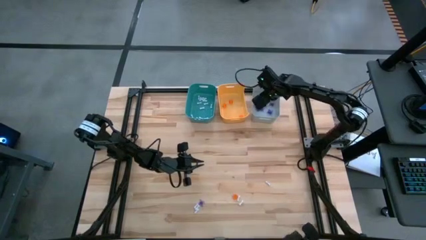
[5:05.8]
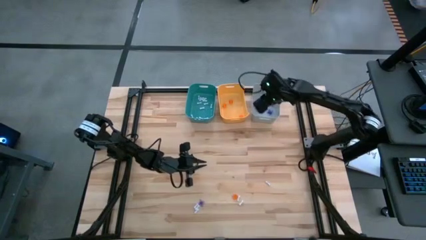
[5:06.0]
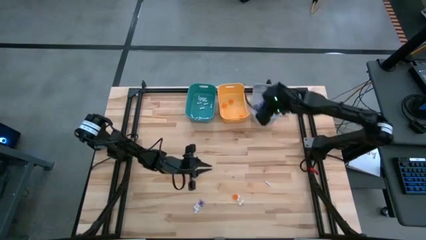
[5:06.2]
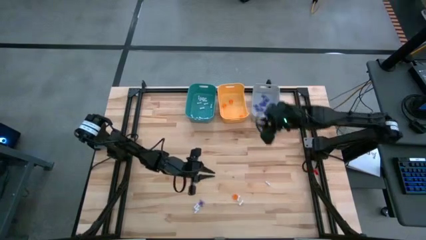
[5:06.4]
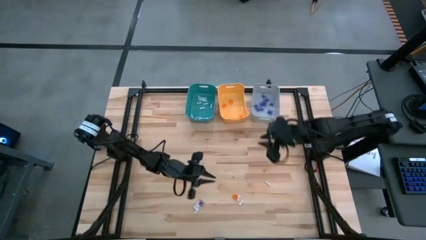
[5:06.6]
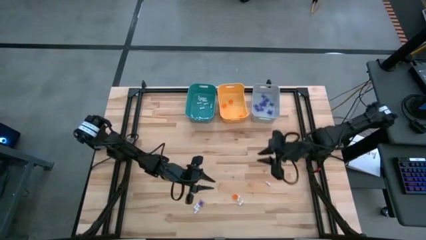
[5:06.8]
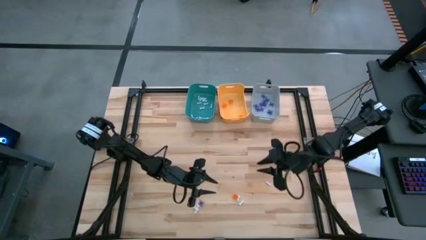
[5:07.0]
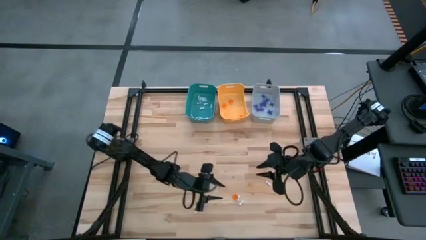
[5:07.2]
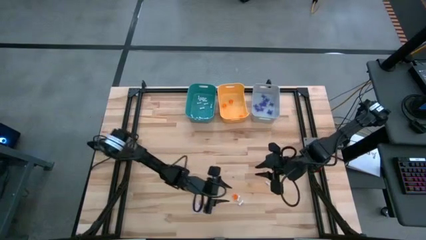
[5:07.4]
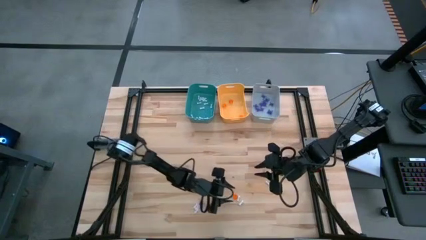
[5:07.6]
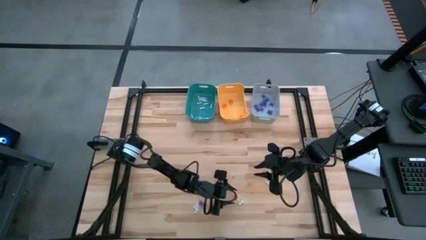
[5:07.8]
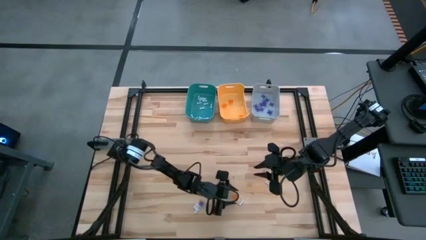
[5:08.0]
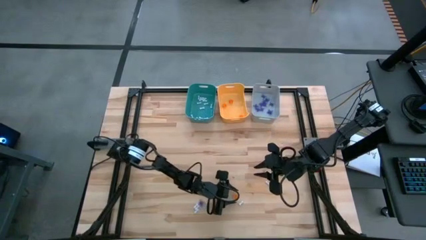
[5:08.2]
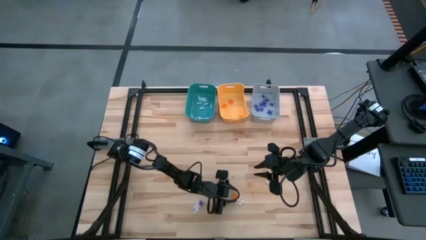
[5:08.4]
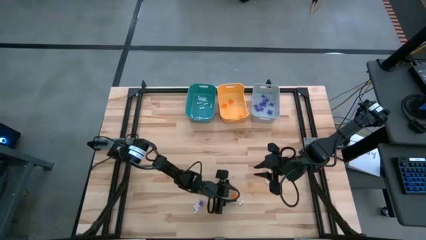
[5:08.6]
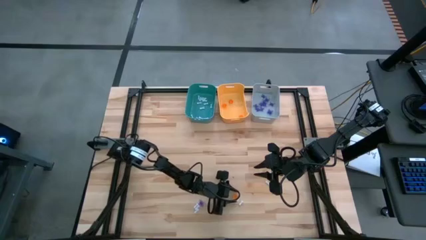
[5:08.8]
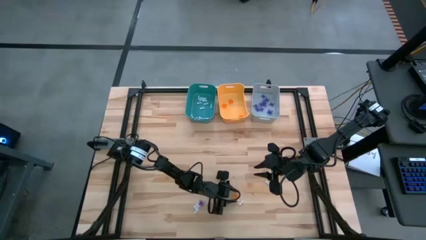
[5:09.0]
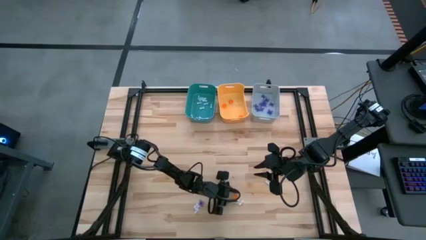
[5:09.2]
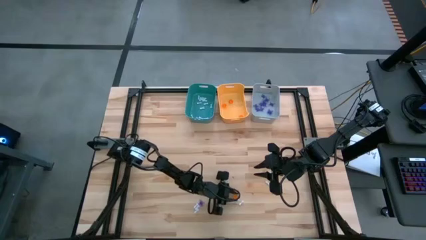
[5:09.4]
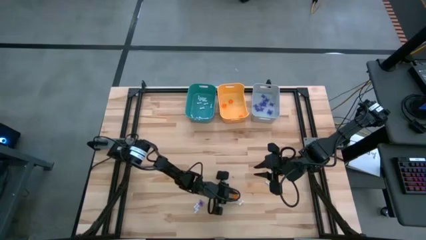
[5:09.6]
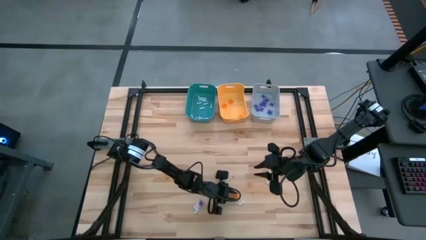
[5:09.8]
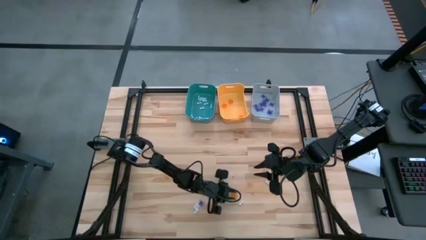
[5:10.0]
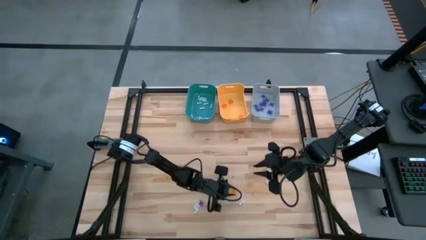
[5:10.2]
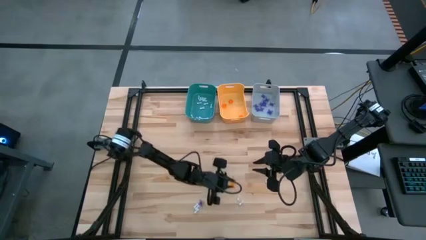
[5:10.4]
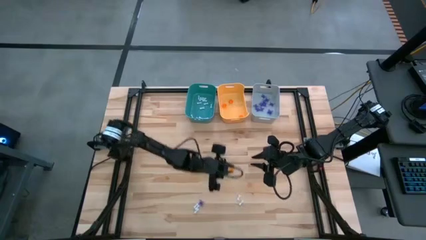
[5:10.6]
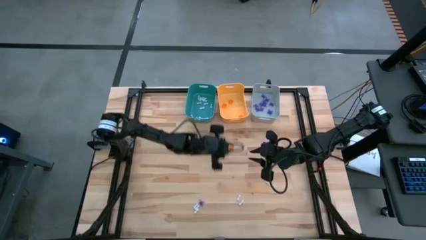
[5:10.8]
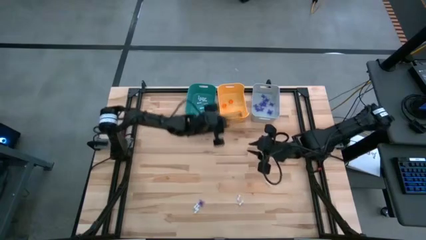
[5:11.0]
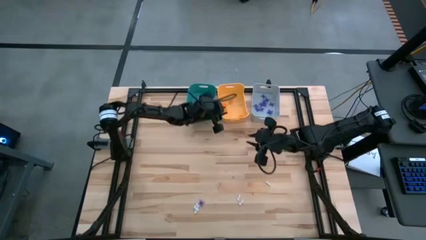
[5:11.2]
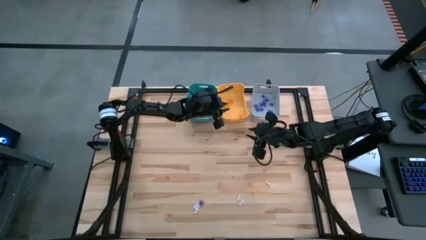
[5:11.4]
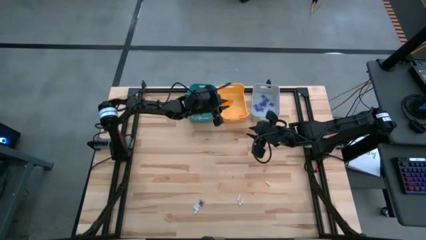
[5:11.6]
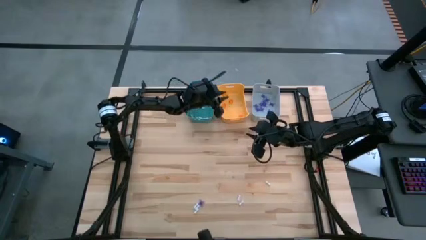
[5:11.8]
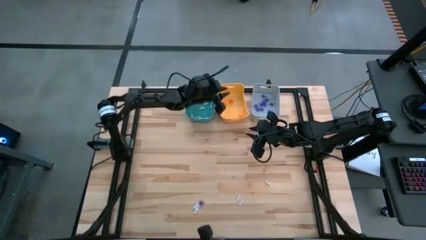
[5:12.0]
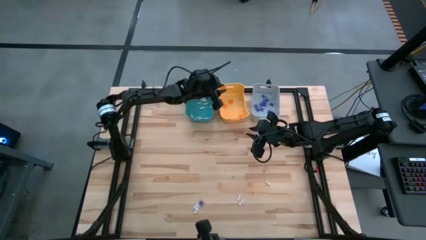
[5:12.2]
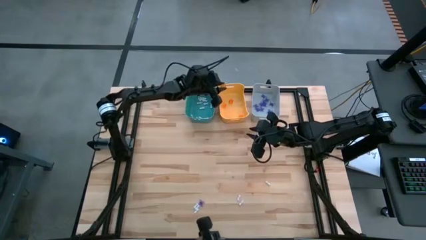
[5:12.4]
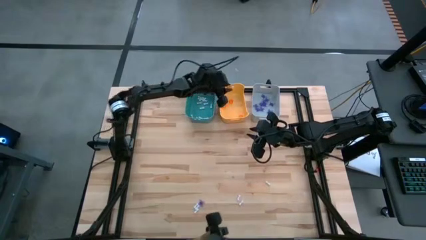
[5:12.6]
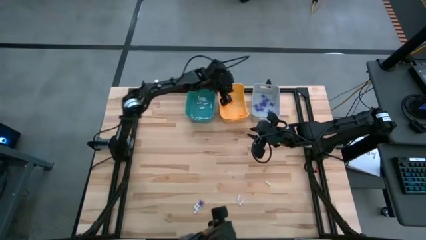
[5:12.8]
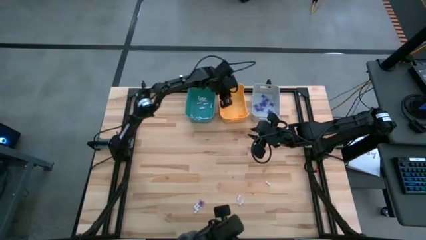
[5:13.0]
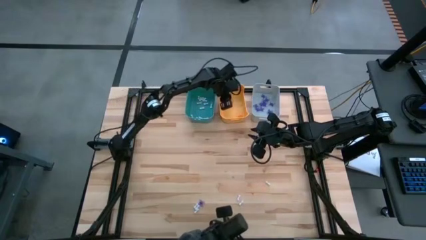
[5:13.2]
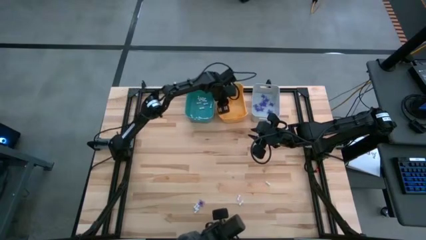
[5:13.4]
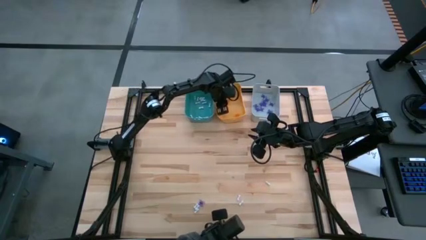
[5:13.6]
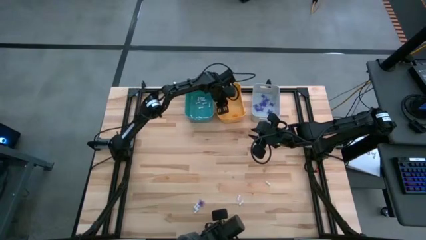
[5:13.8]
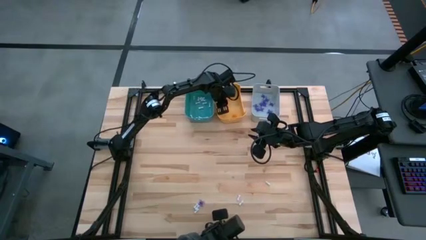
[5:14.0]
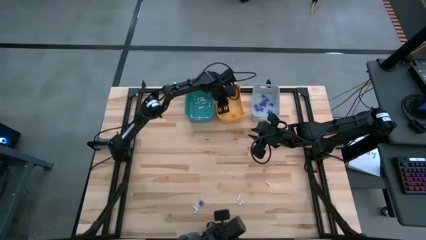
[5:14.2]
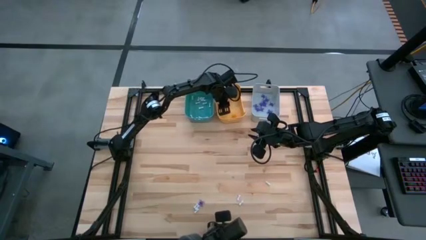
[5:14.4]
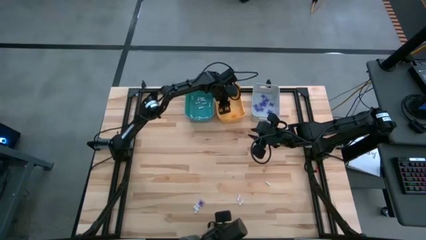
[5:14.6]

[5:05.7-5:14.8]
Task: Sort Halloween decoration
Put the orange pumpkin toy into the yellow bin

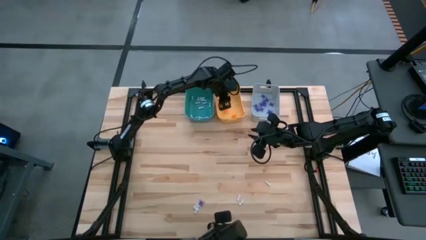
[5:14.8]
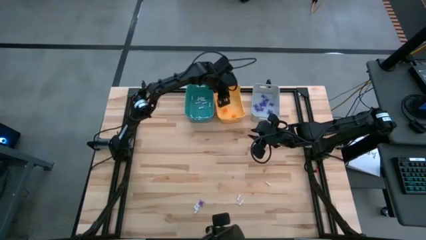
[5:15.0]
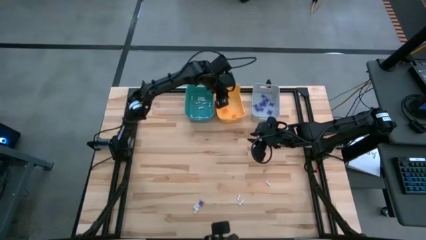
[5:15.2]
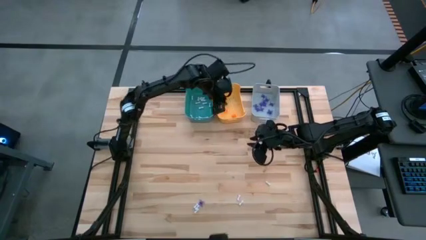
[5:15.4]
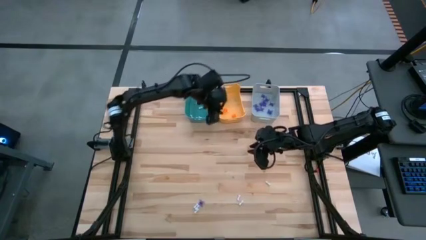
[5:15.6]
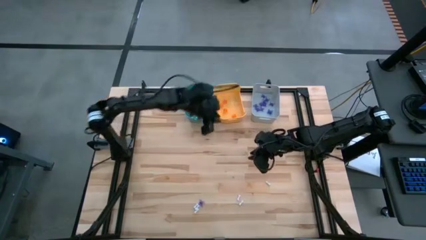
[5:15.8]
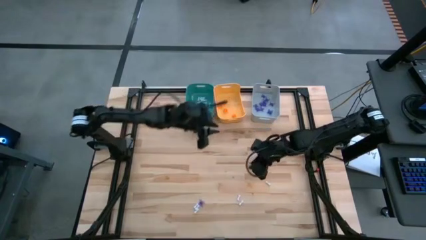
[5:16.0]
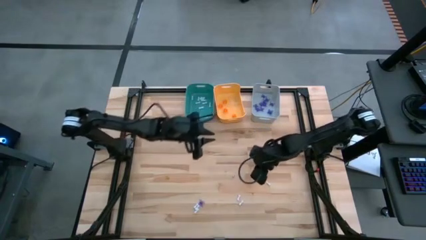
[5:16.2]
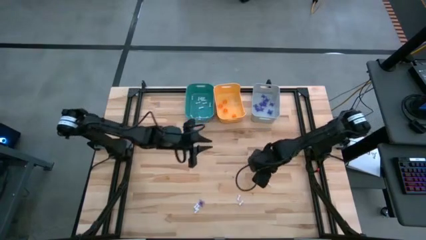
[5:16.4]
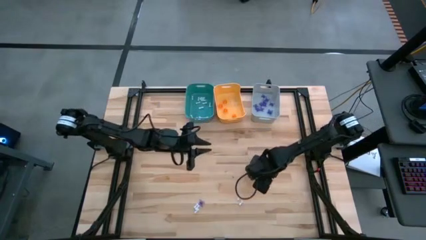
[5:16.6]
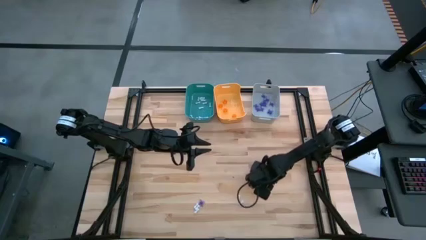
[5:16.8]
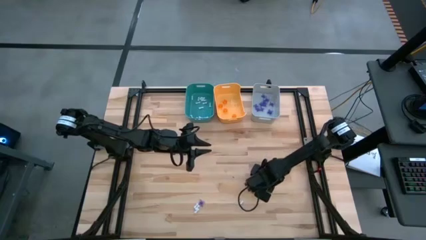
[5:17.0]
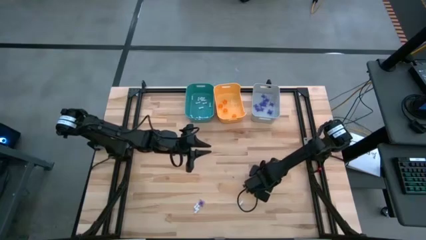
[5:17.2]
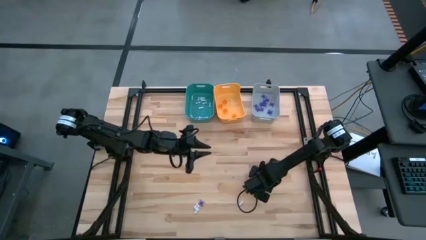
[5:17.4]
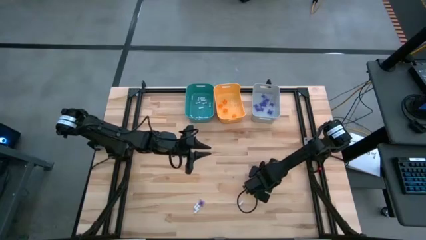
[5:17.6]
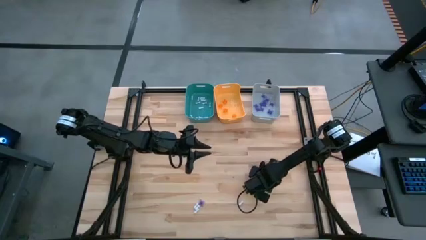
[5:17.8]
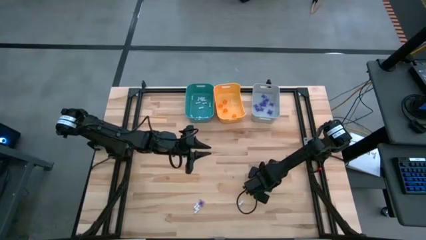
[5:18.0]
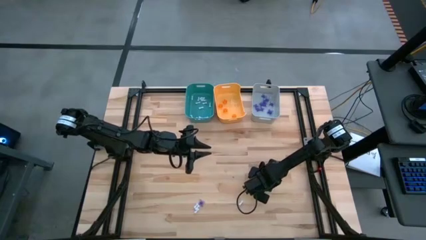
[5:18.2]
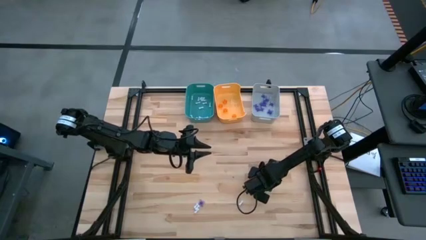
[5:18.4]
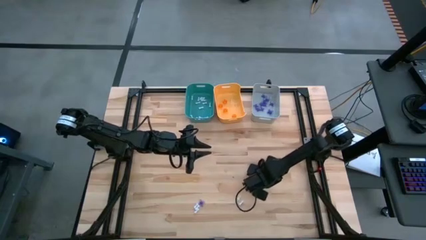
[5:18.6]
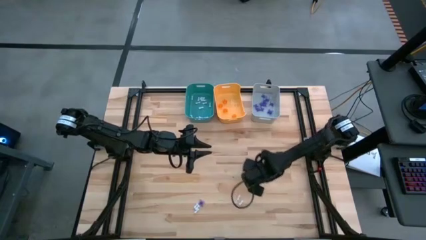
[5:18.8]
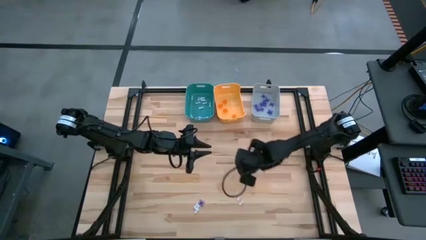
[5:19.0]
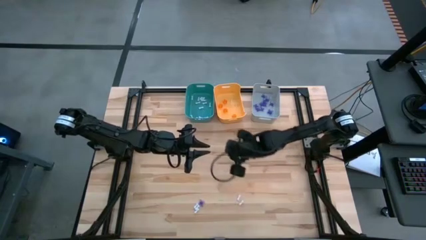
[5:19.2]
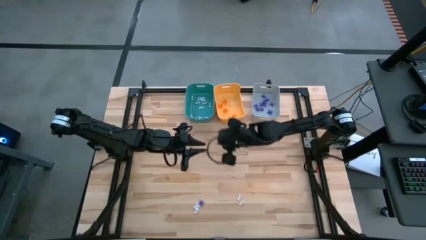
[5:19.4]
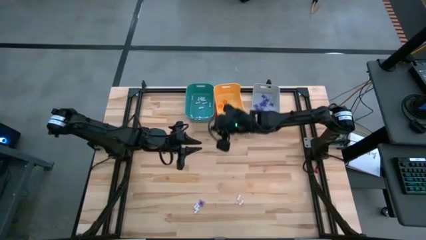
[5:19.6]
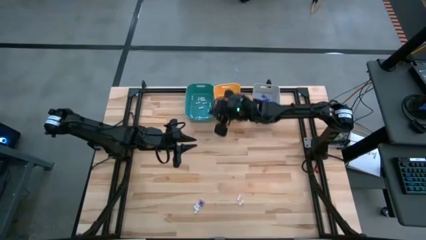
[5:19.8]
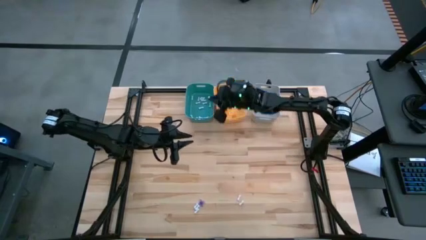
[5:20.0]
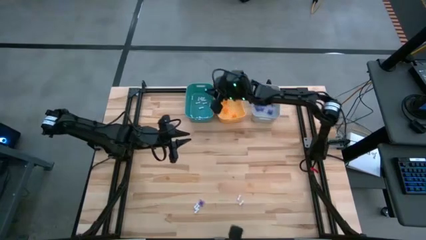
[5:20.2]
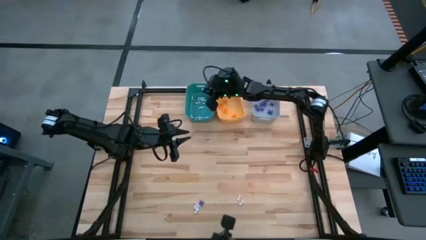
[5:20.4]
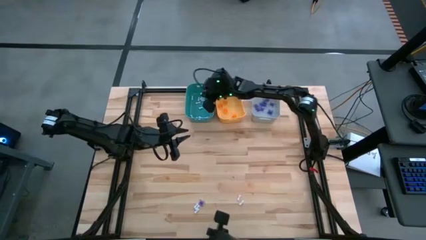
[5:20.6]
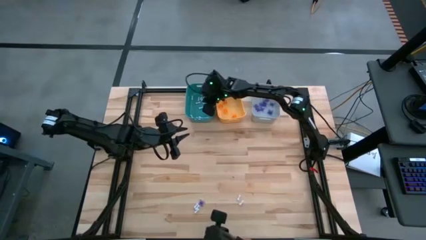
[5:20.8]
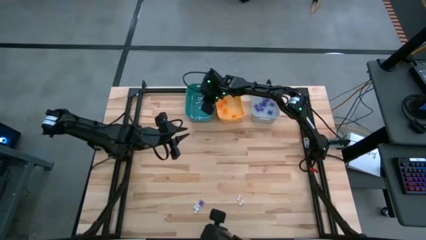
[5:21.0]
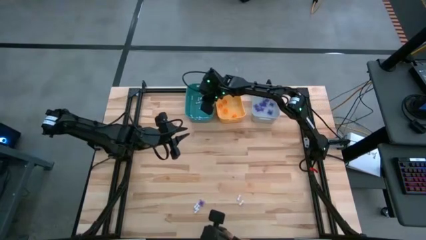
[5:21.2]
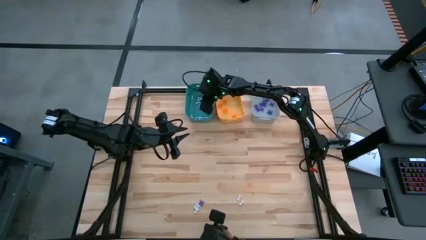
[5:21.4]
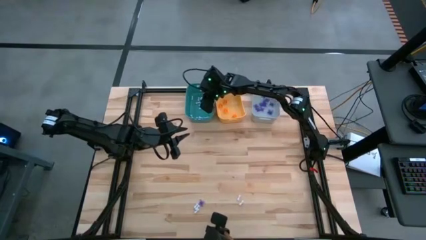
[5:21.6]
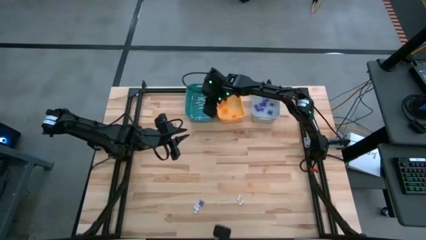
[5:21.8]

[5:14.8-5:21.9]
Put the white bone toy into the blue bin
